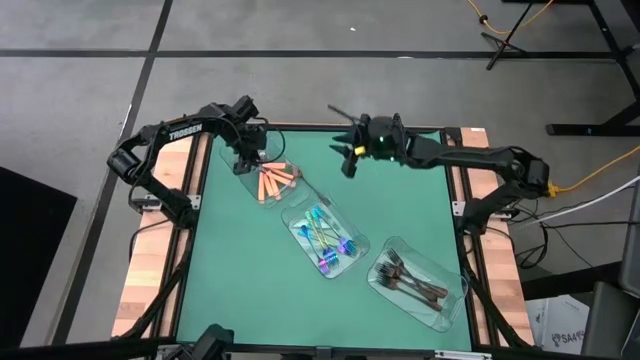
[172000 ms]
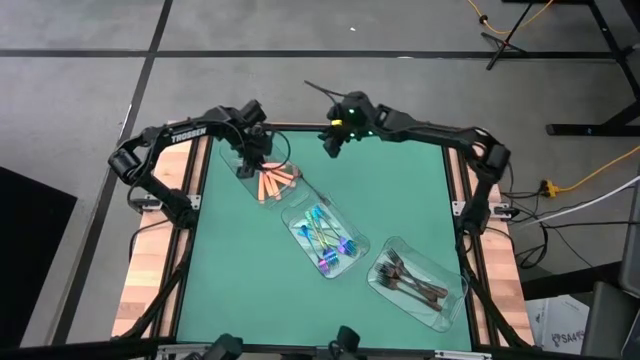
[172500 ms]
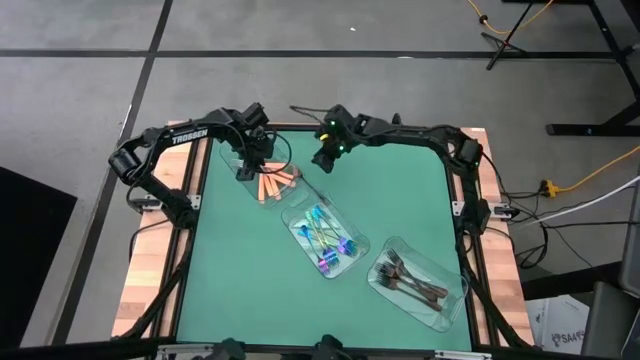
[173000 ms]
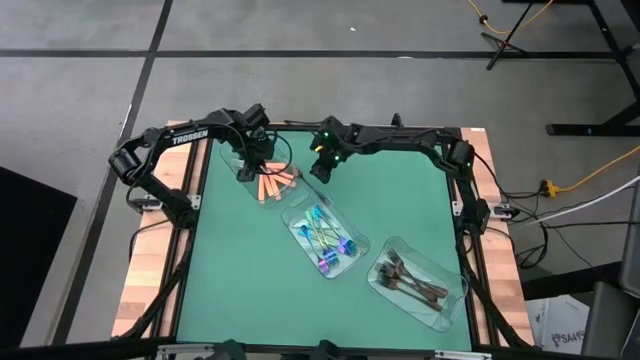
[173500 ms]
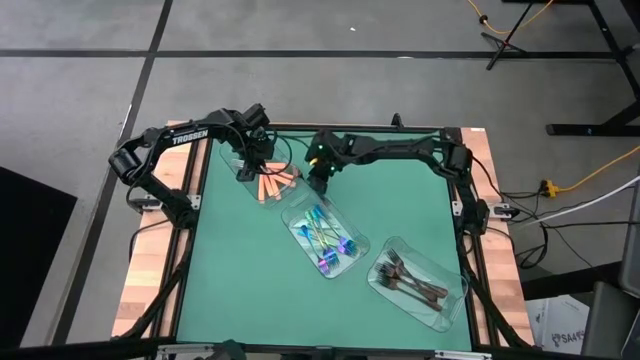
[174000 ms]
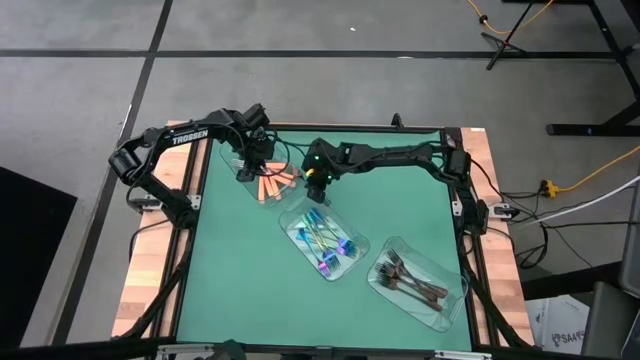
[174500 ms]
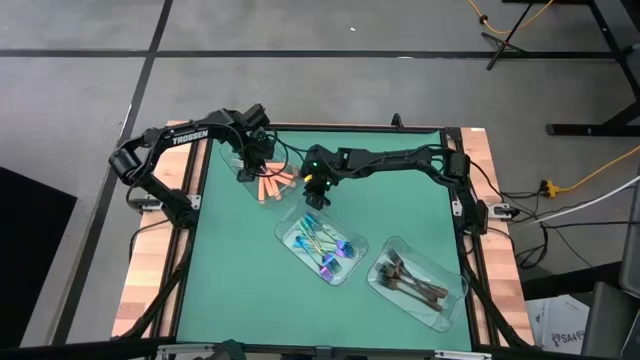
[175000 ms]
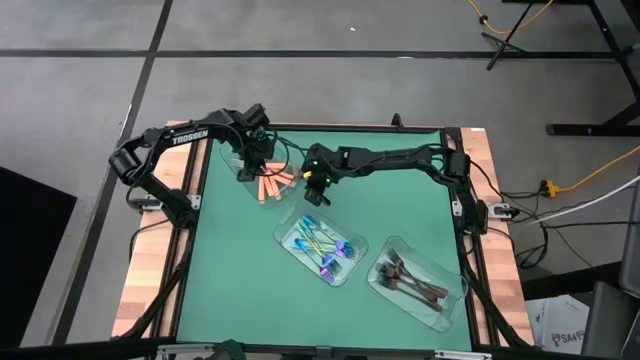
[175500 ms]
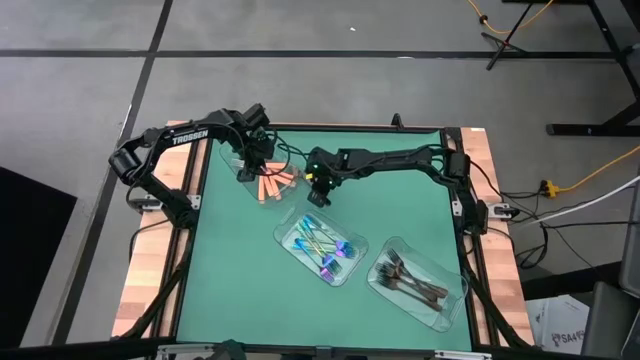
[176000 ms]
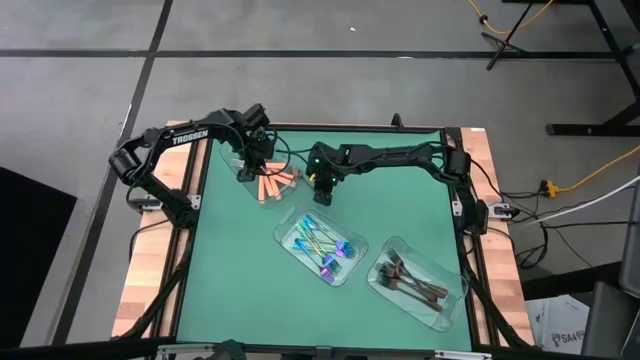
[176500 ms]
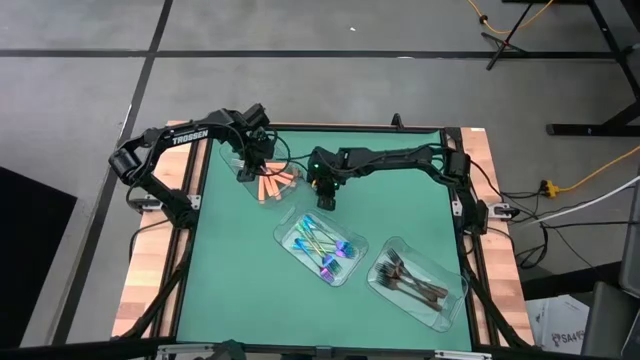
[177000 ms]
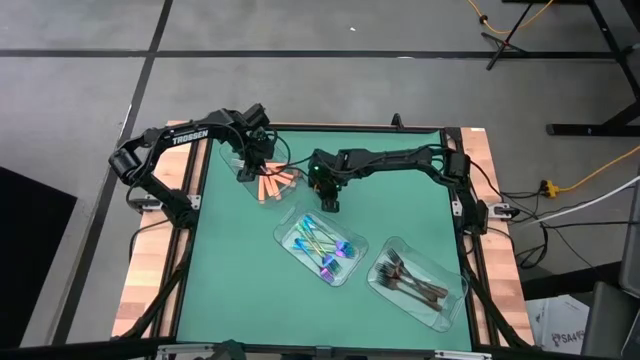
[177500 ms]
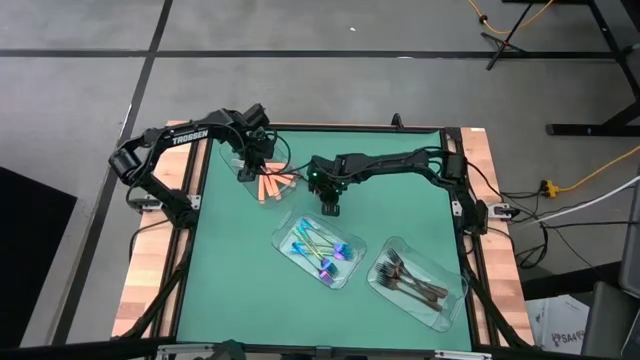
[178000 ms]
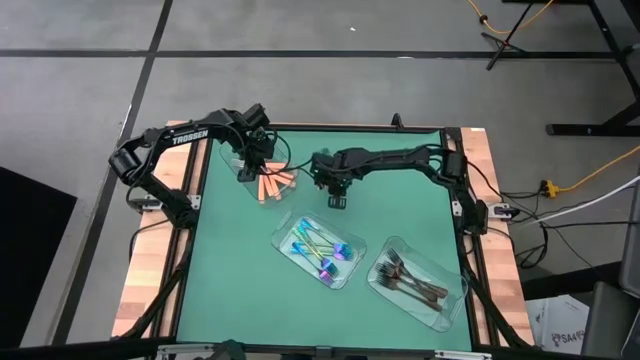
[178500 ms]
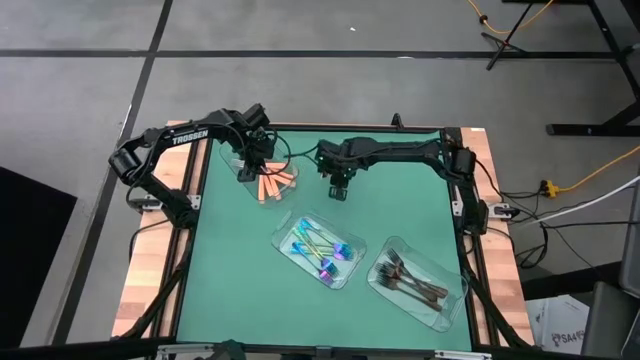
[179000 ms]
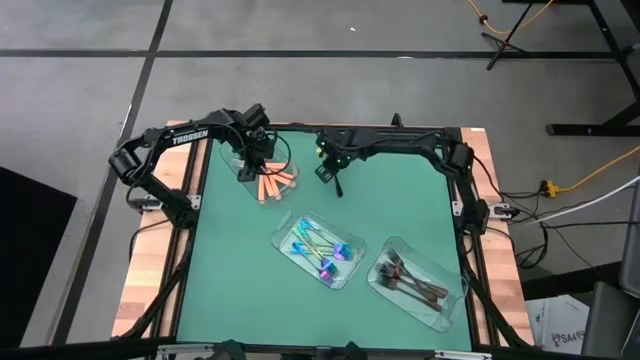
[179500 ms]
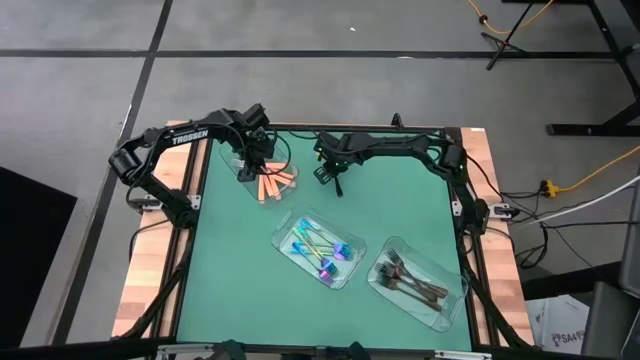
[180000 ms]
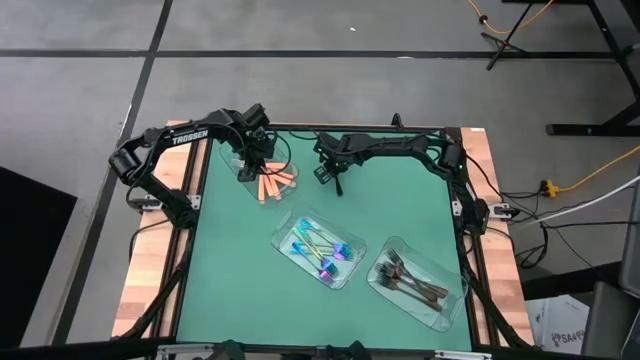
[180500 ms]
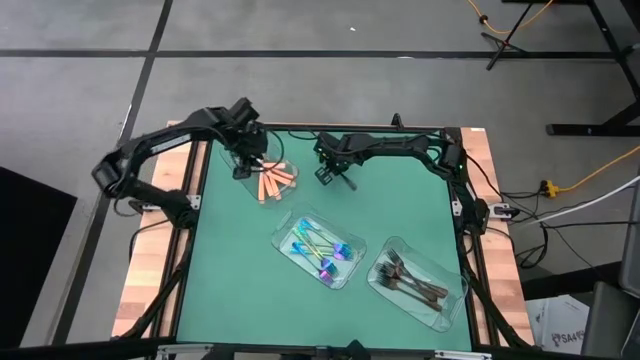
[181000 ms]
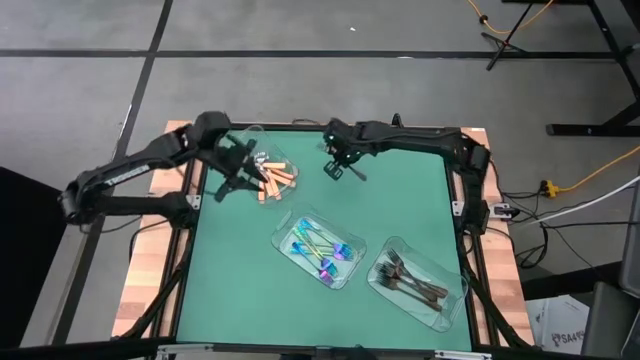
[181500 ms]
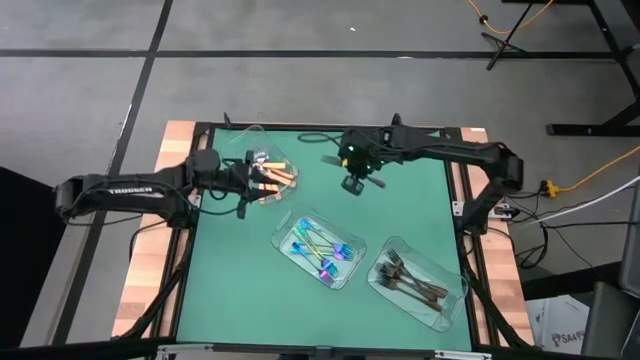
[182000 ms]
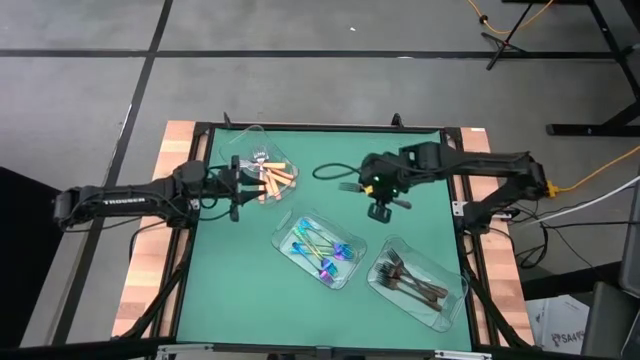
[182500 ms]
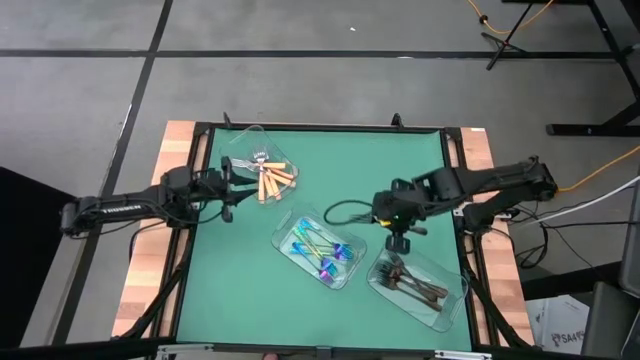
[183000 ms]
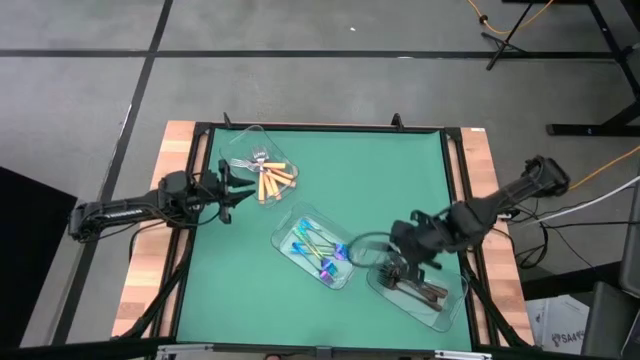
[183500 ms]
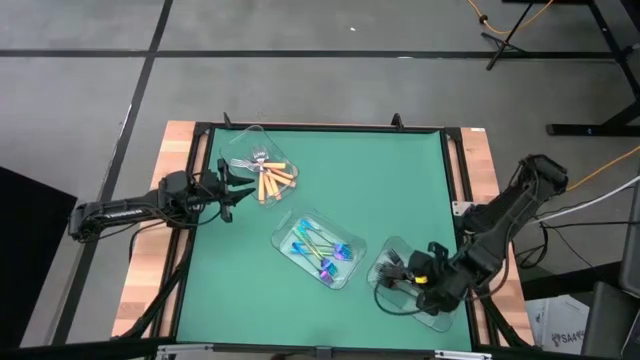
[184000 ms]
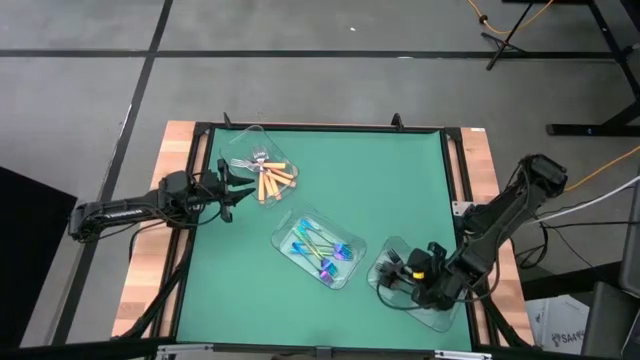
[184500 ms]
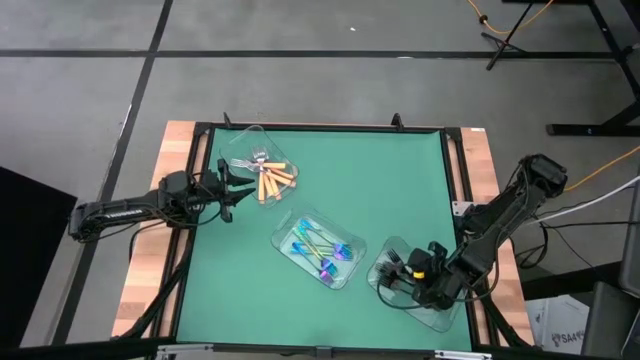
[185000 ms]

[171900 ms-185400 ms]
Task: Sort silverware by color (type)
Put black fork into the bottom transparent bin

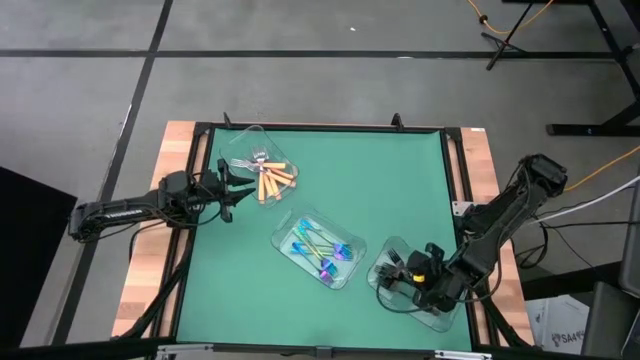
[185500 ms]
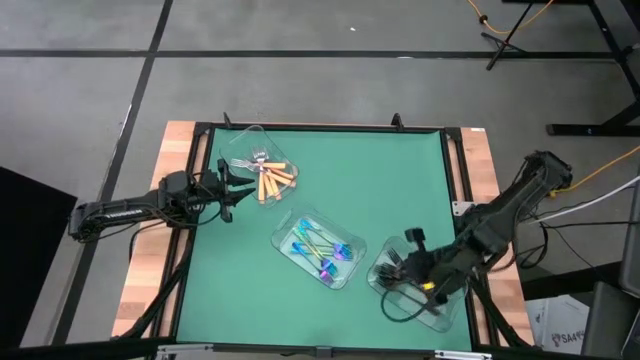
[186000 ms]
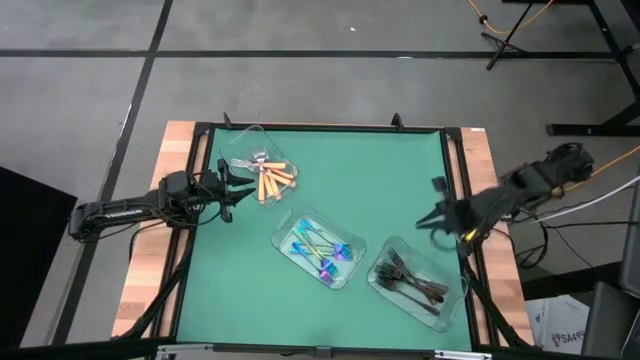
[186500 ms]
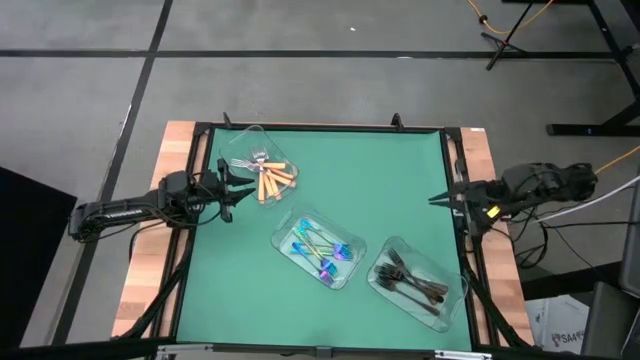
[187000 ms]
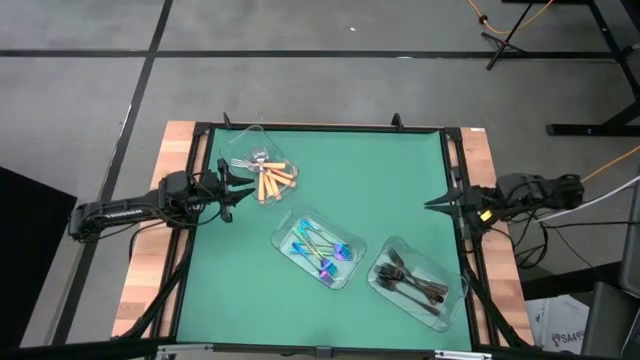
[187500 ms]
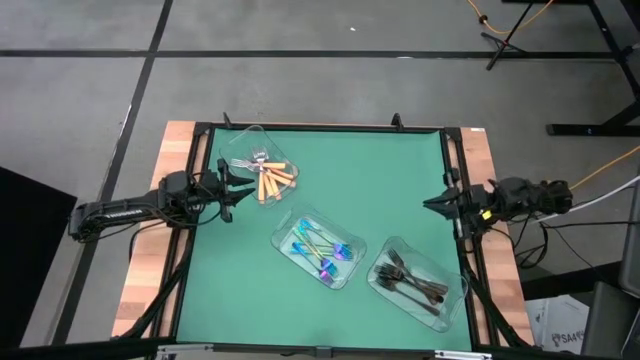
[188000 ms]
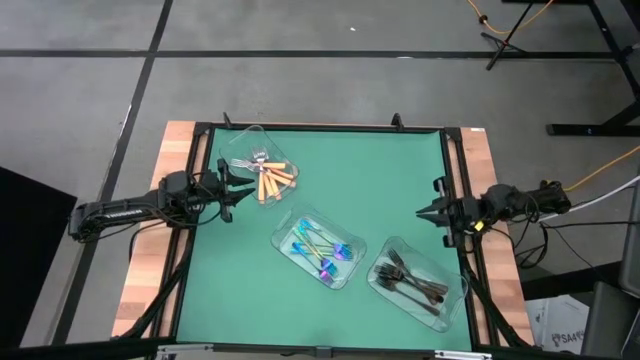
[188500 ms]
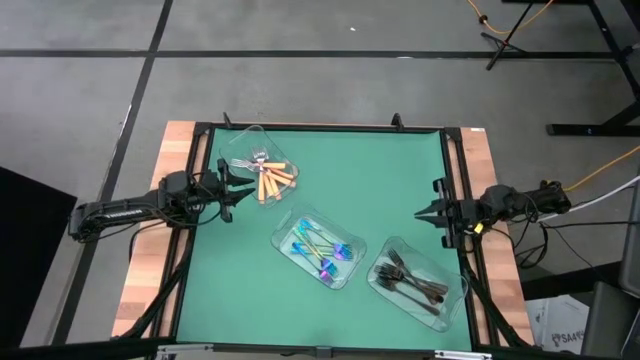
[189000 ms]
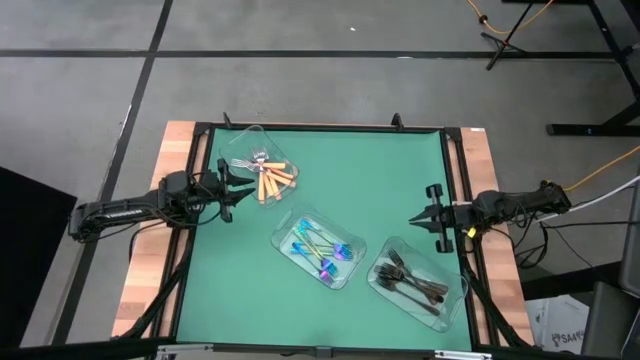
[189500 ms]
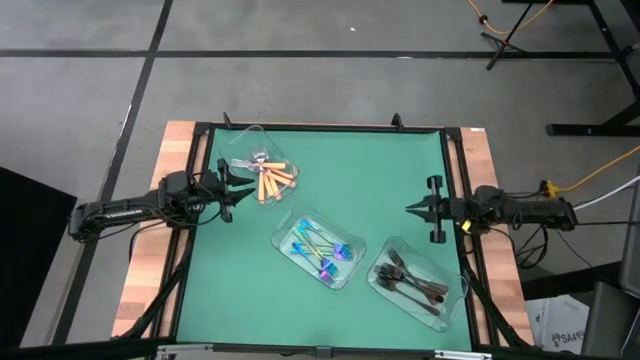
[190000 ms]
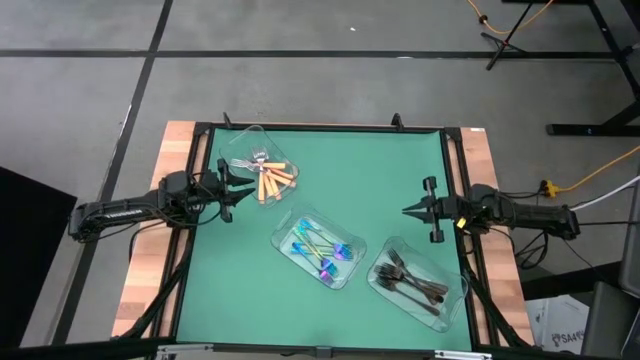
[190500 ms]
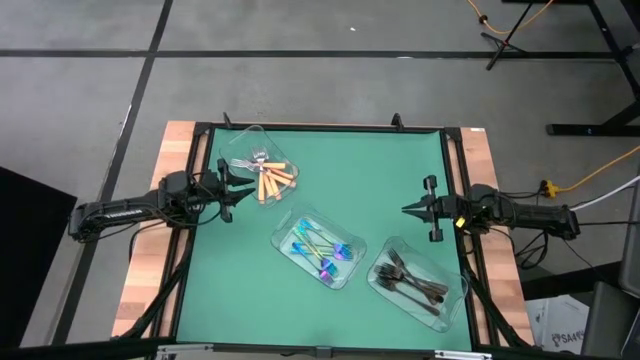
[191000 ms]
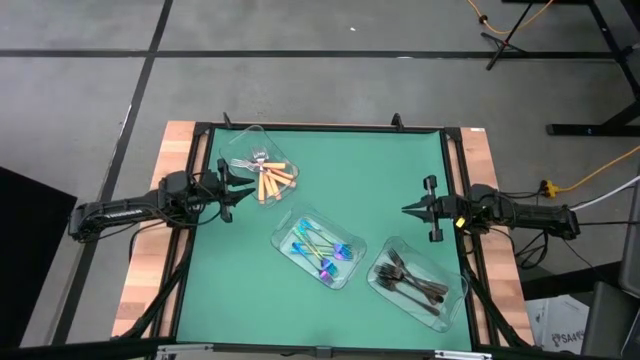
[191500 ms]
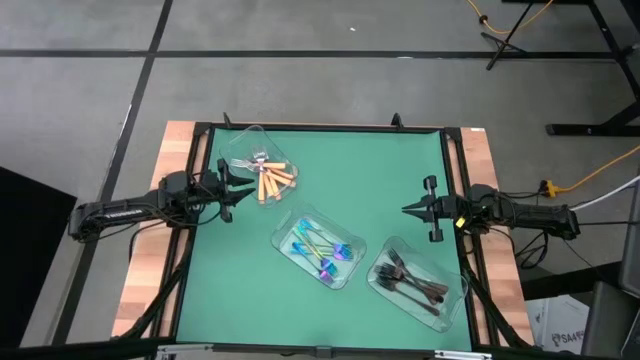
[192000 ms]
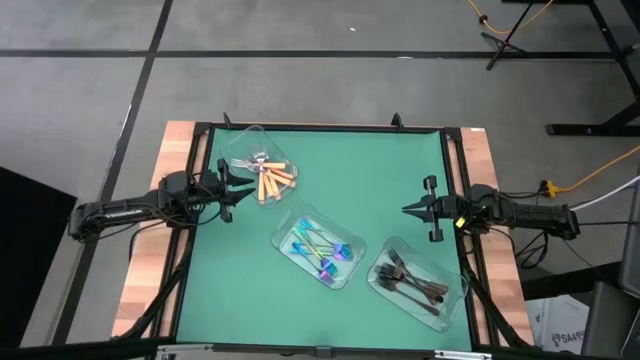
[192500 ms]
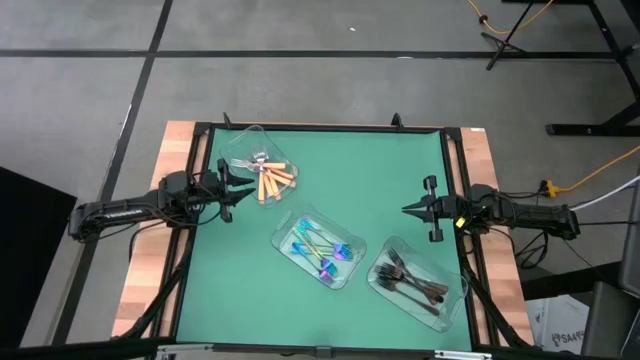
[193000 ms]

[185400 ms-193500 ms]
Return to Home Position
